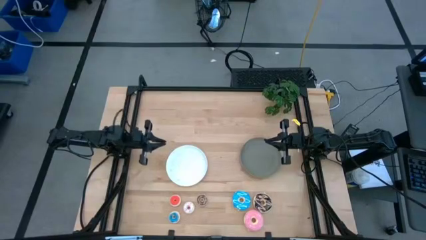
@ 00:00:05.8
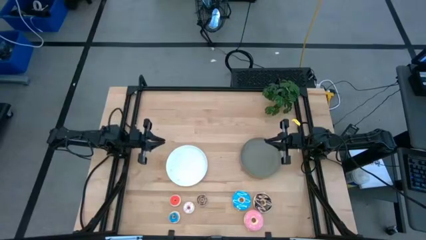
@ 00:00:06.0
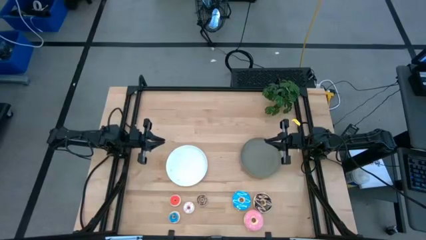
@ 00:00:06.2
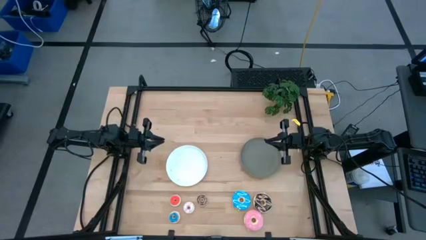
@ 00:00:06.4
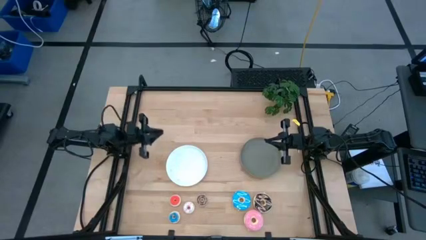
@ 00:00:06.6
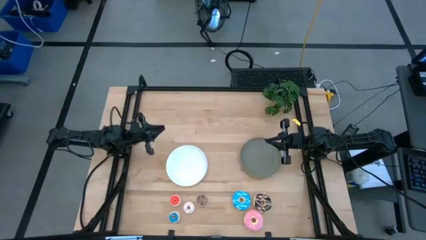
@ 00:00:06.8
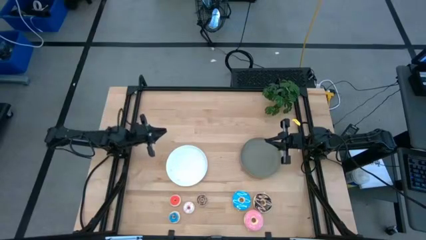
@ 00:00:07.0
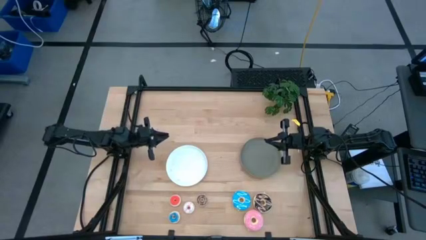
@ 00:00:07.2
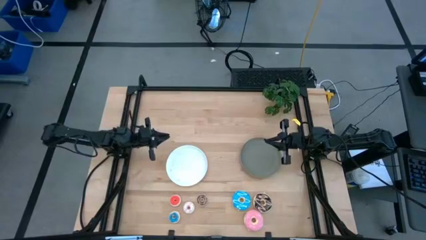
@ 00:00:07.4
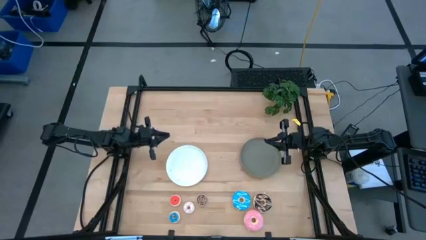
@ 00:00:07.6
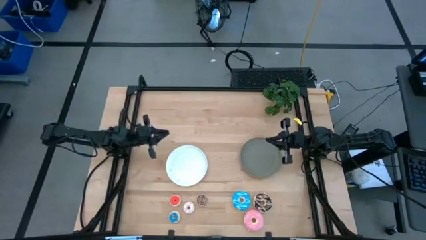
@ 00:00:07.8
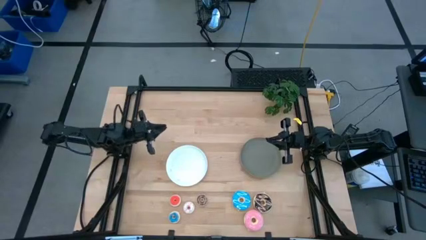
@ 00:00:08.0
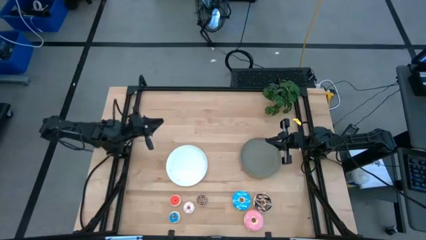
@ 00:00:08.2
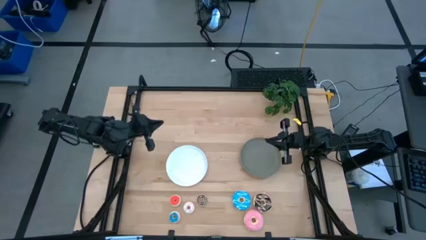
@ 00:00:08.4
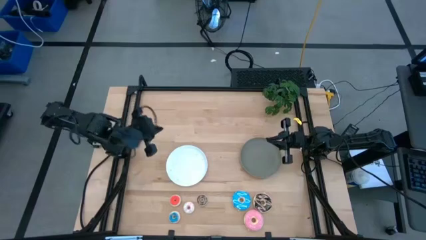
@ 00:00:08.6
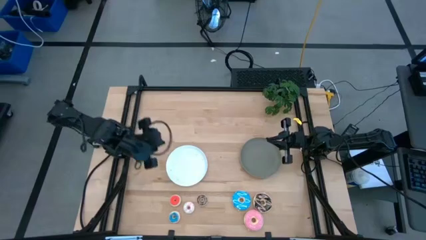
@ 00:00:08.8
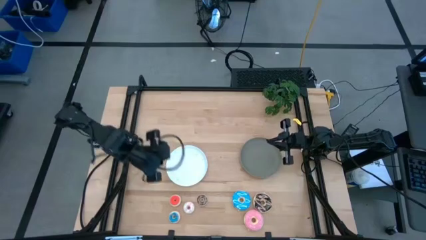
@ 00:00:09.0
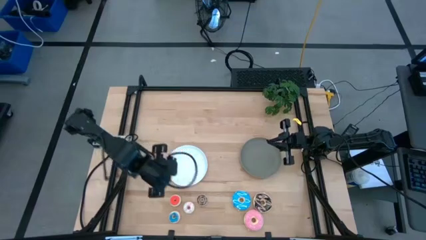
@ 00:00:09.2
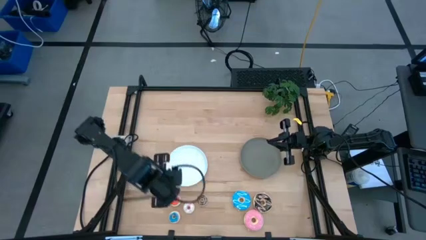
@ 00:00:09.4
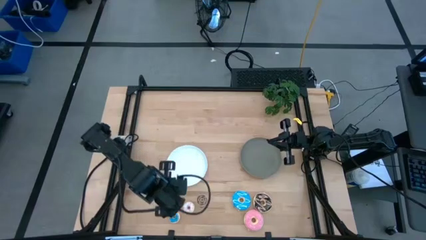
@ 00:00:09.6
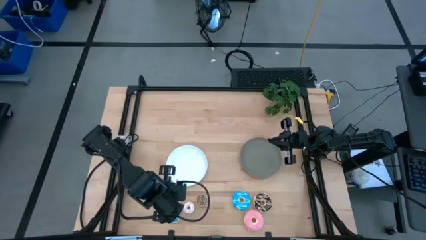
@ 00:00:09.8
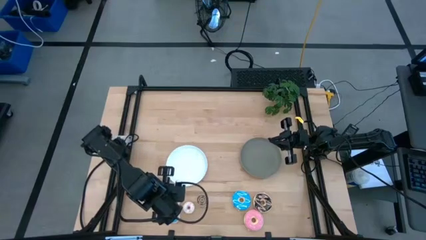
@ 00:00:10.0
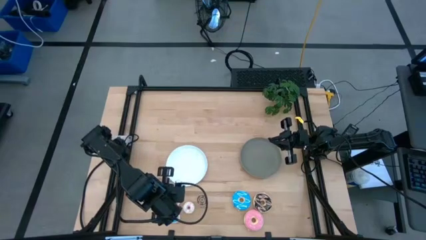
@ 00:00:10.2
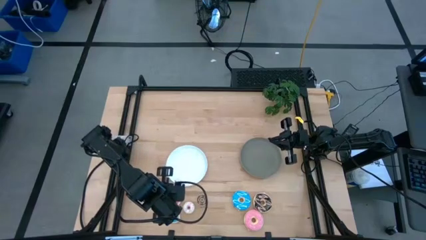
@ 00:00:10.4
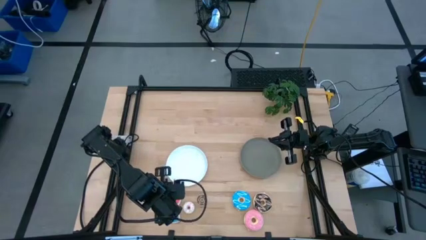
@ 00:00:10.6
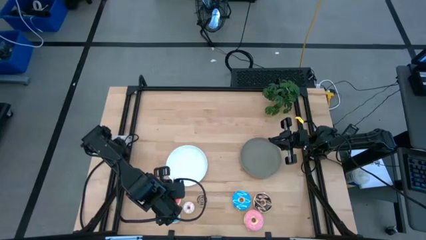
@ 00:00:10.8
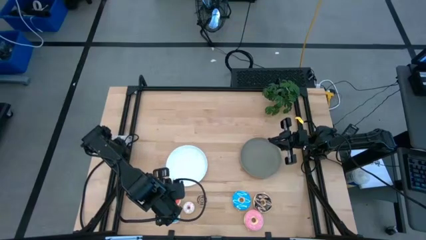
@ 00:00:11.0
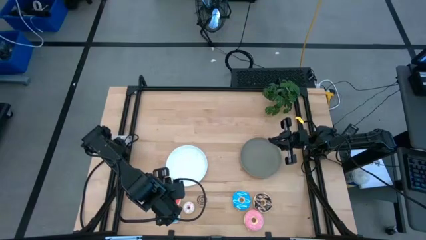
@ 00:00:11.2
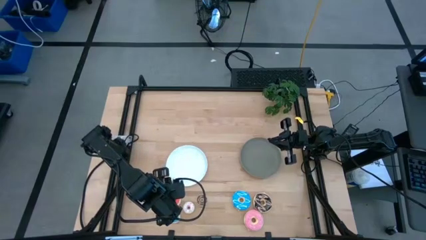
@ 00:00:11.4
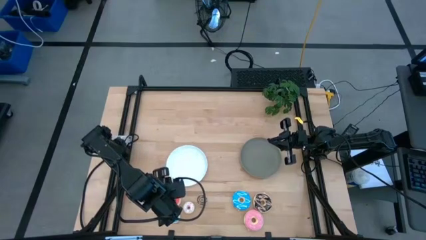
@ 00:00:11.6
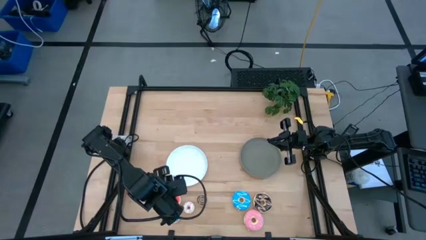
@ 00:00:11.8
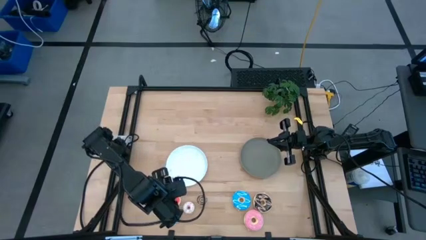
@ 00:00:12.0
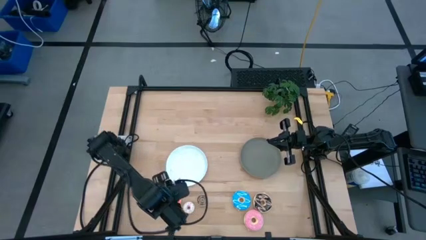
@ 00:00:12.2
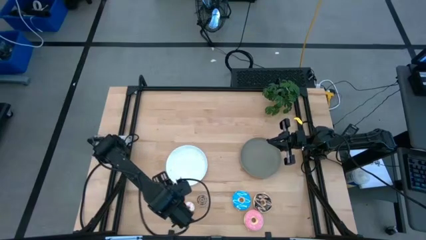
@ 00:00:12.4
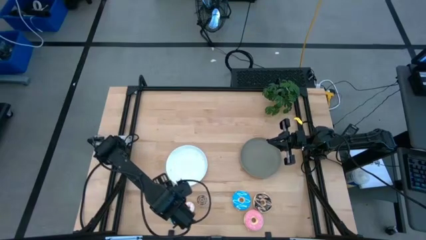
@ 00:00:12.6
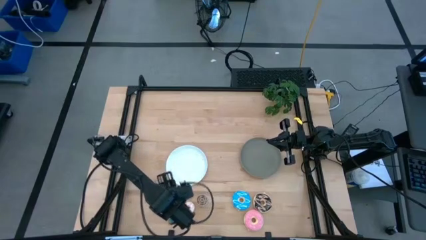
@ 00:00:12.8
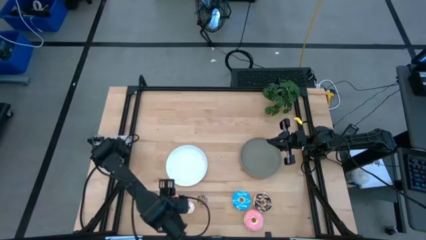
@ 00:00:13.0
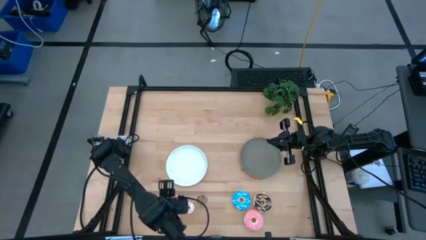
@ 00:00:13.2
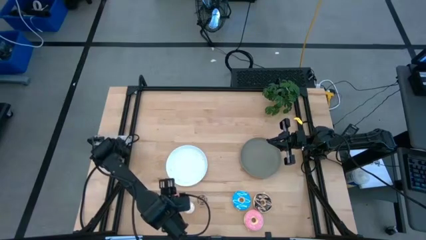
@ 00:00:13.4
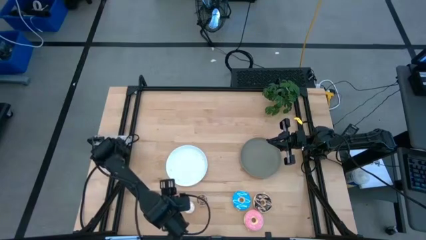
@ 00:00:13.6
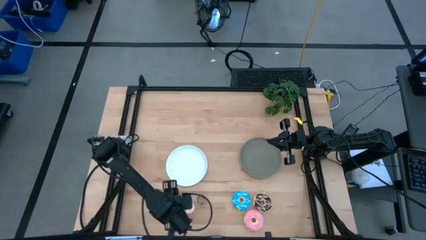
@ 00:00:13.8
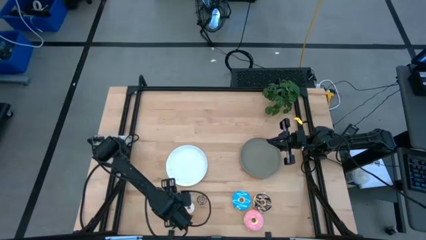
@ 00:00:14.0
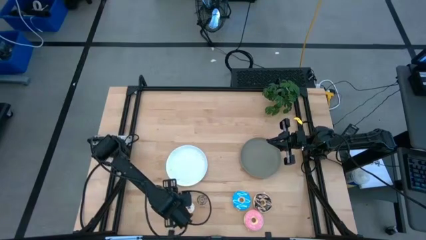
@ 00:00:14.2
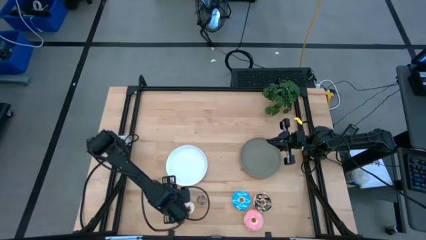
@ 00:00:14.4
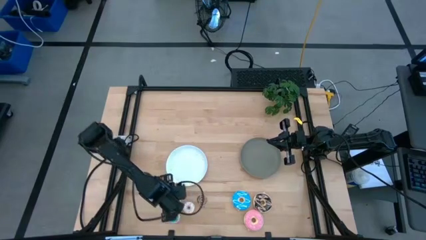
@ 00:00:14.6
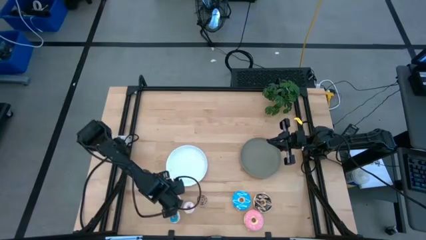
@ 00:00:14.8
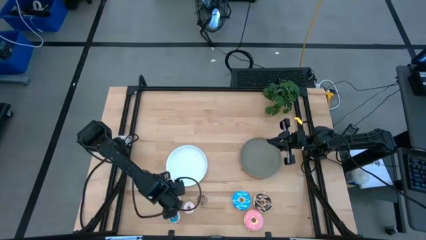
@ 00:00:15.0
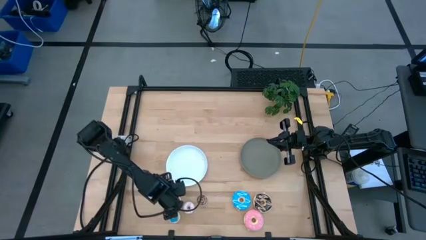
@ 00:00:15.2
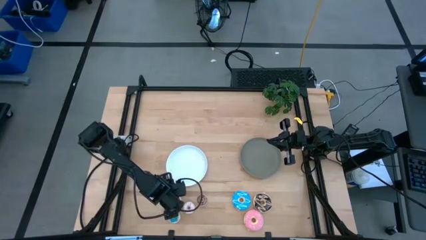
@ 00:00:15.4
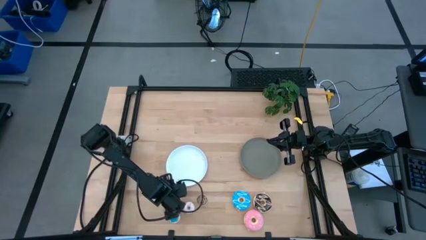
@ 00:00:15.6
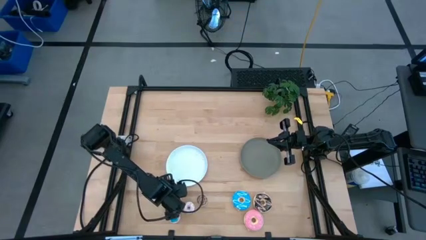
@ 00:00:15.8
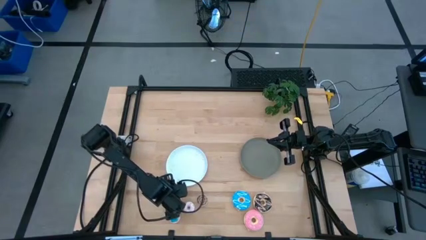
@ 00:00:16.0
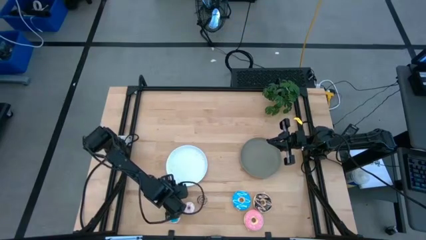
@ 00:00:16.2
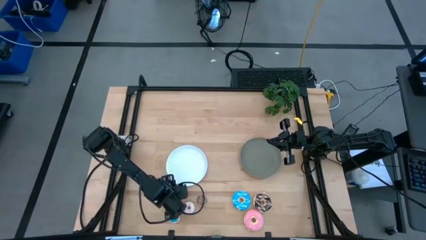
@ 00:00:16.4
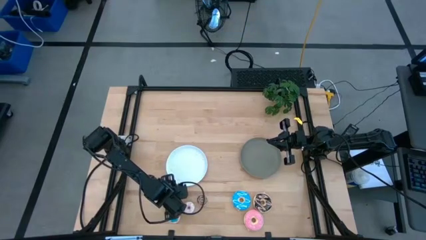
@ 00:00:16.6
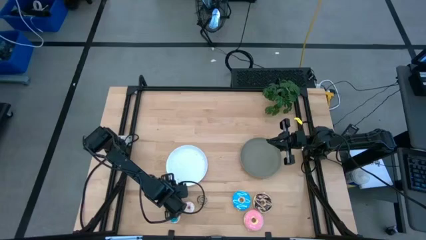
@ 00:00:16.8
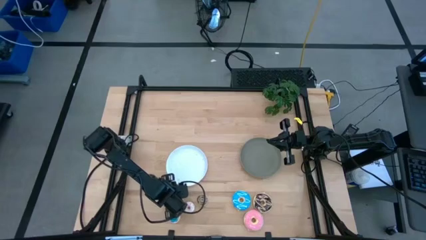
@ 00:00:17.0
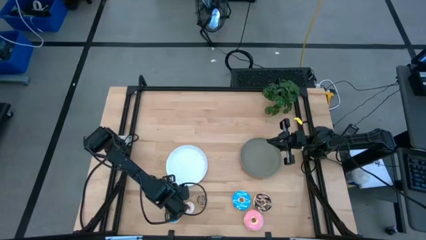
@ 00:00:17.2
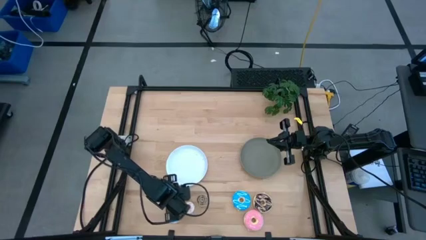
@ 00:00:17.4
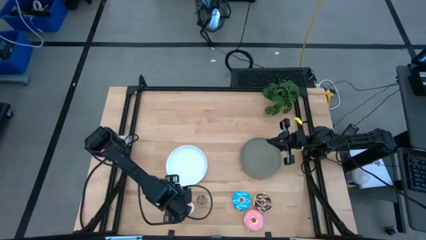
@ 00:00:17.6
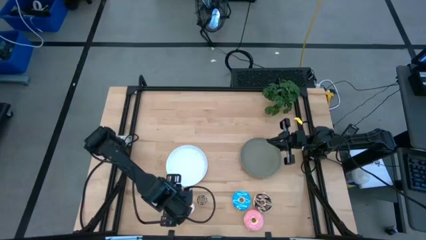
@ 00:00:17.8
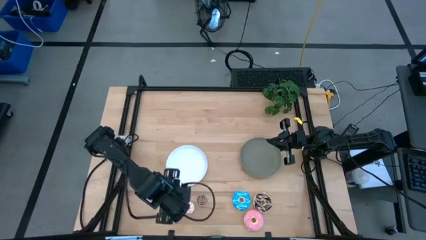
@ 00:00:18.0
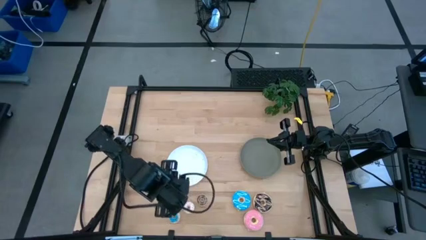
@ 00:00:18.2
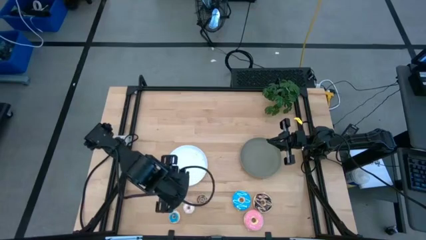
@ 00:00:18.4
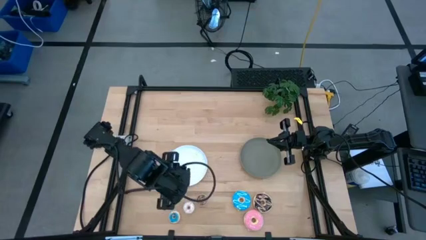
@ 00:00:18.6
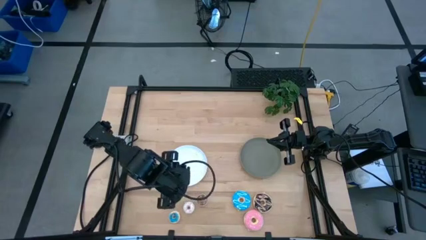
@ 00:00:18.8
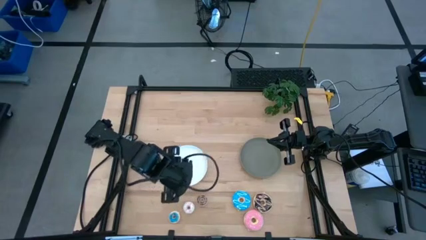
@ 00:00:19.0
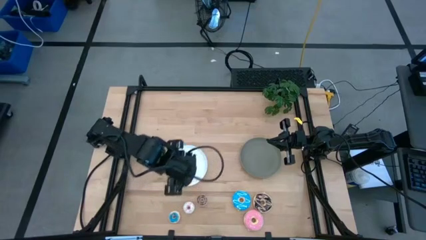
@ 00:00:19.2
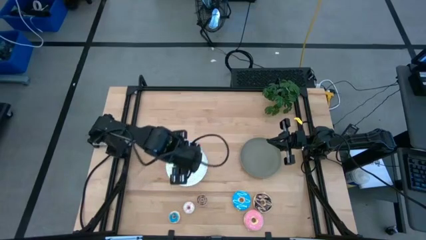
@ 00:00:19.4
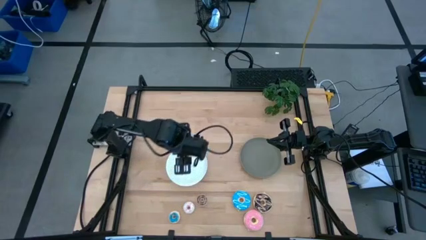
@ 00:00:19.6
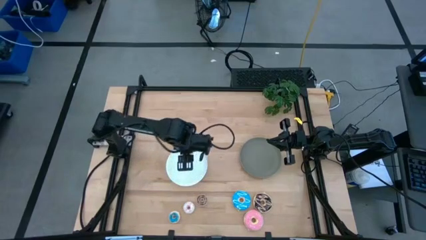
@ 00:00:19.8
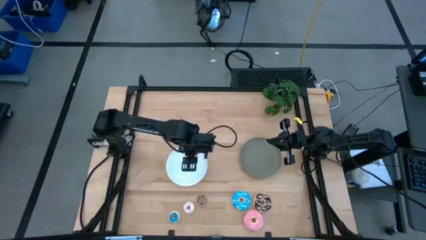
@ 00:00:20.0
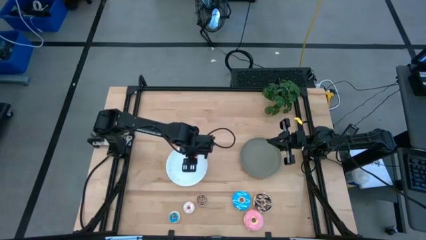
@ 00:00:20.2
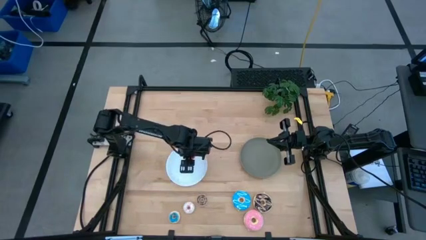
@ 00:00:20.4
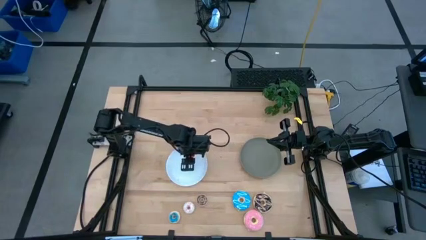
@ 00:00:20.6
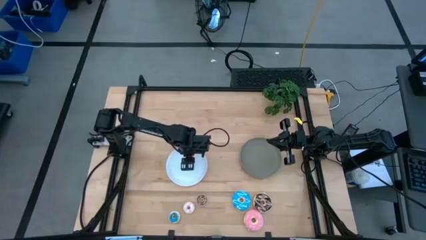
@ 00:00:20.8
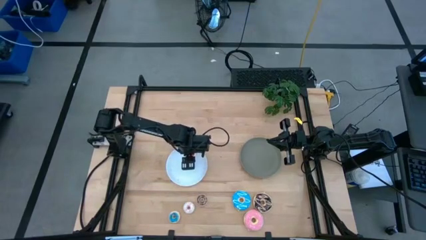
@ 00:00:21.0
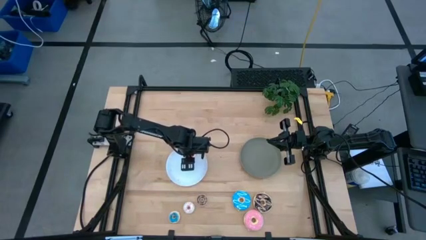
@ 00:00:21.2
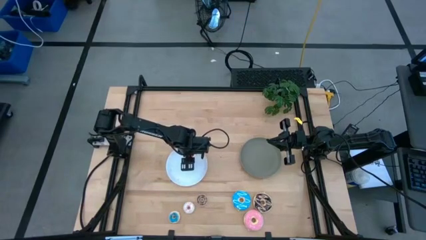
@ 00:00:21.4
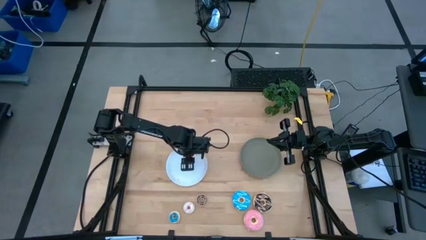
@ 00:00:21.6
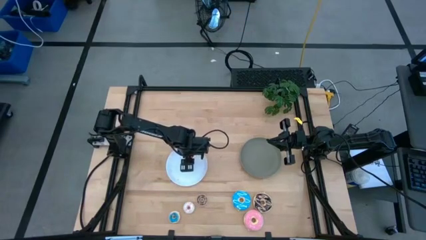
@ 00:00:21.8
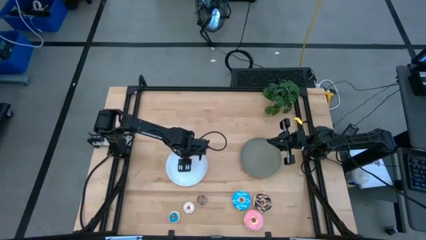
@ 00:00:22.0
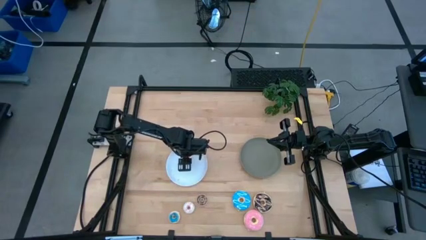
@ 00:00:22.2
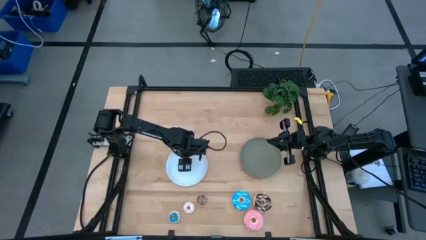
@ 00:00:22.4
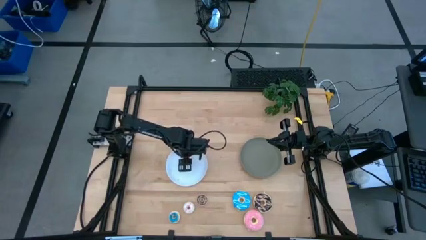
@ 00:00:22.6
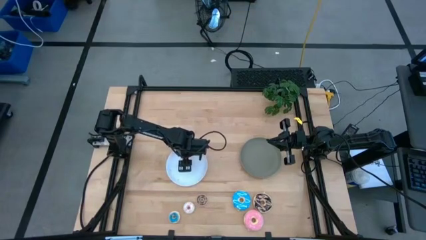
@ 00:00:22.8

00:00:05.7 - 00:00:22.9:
Task: Pick & Place donuts
Put the small orange donut on the white plate
